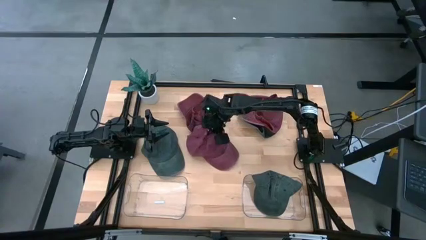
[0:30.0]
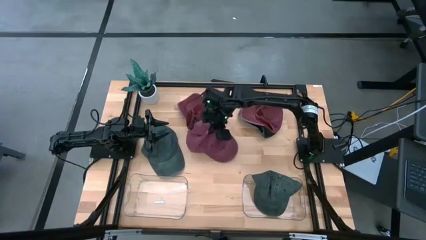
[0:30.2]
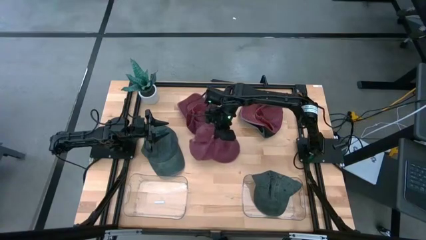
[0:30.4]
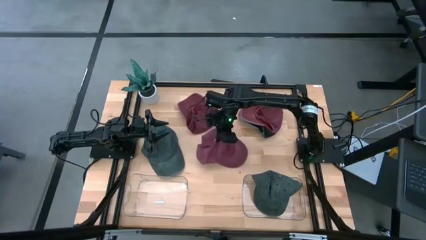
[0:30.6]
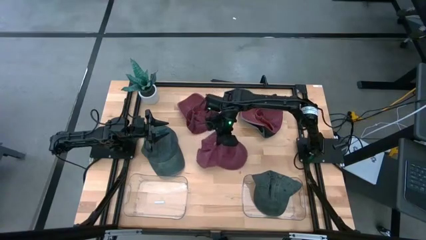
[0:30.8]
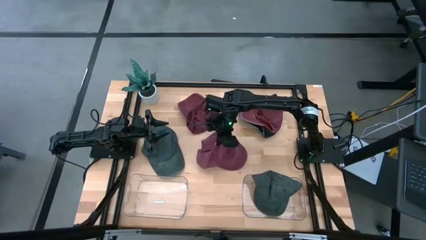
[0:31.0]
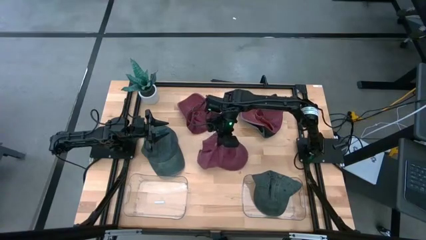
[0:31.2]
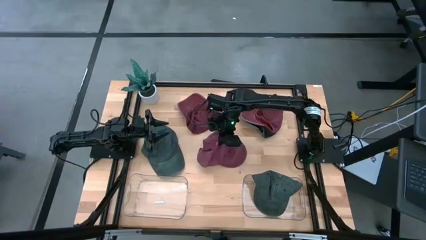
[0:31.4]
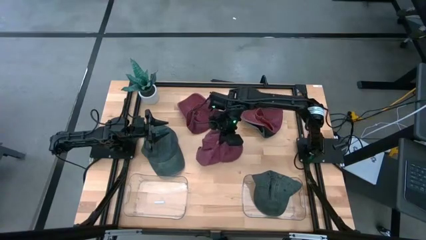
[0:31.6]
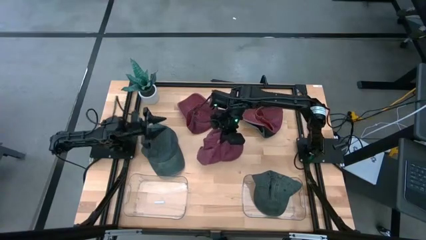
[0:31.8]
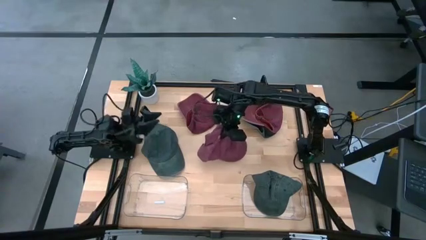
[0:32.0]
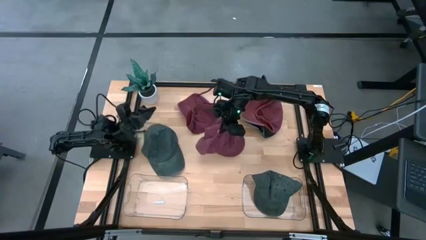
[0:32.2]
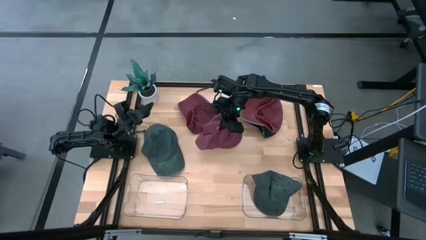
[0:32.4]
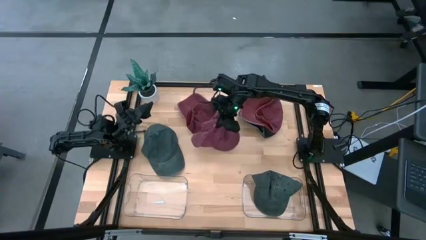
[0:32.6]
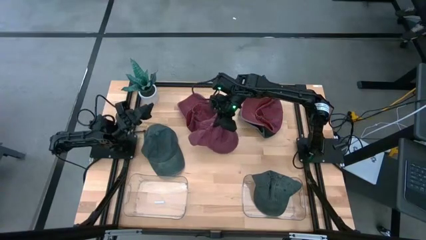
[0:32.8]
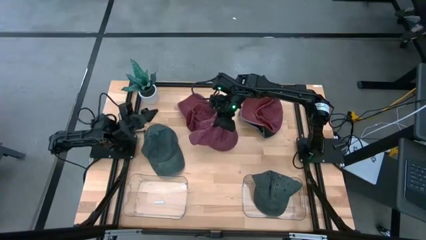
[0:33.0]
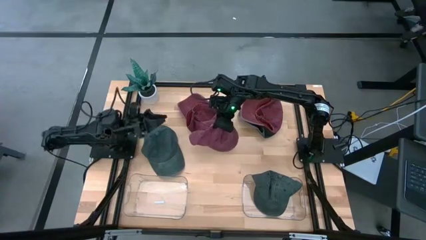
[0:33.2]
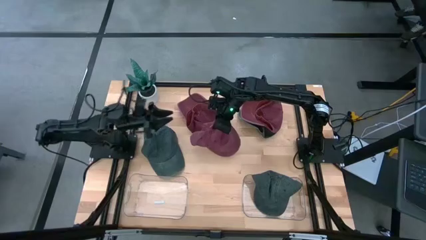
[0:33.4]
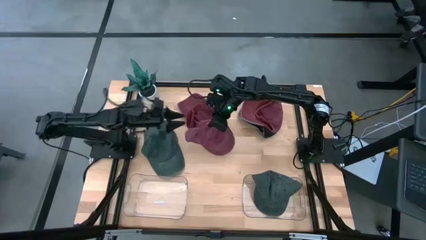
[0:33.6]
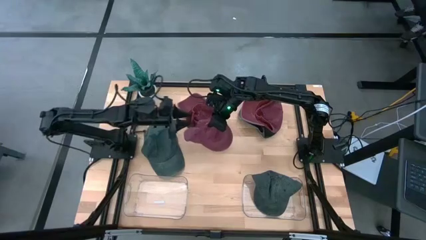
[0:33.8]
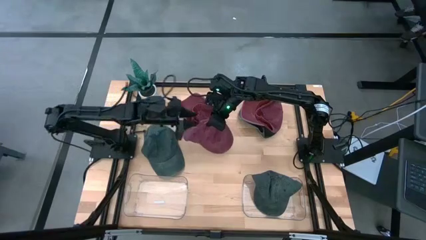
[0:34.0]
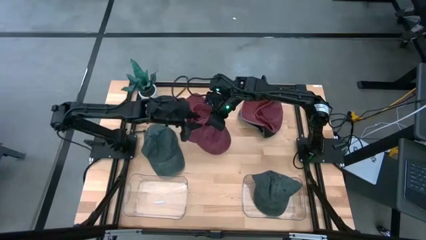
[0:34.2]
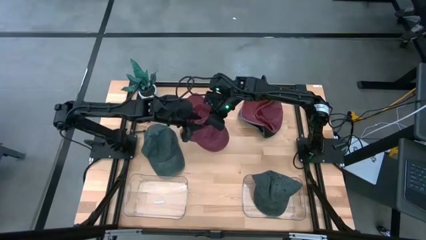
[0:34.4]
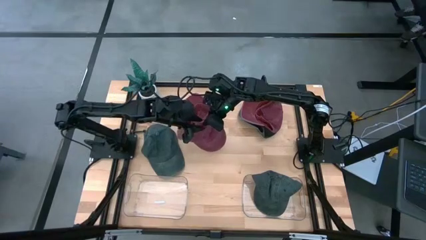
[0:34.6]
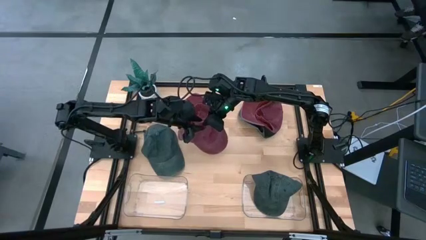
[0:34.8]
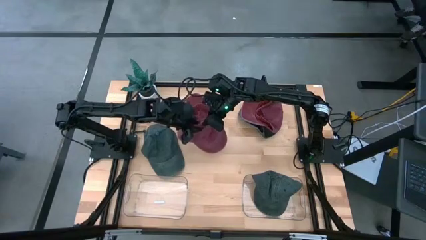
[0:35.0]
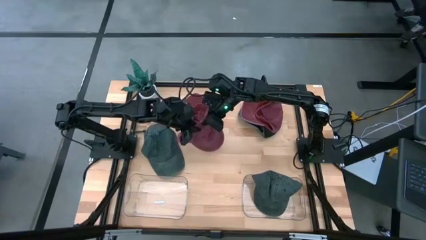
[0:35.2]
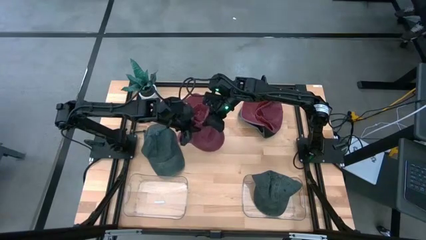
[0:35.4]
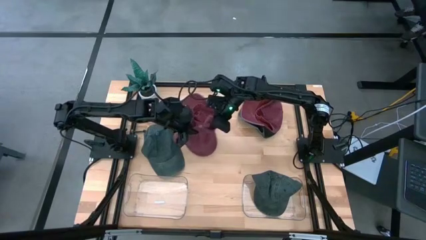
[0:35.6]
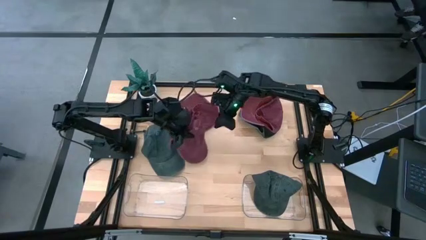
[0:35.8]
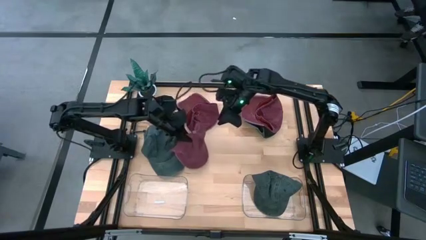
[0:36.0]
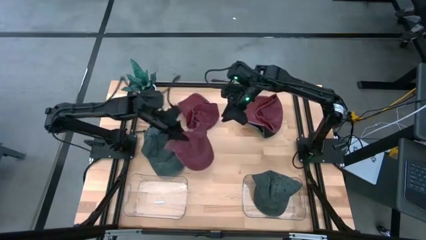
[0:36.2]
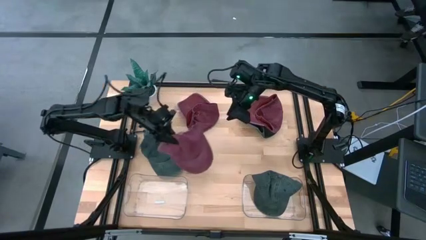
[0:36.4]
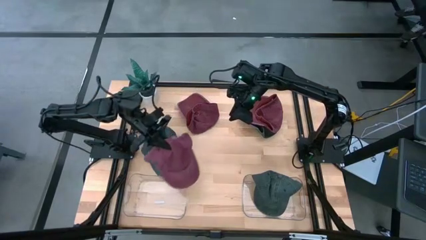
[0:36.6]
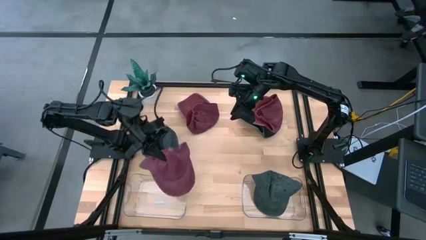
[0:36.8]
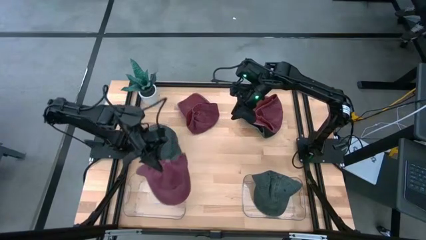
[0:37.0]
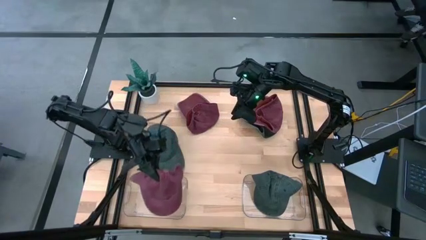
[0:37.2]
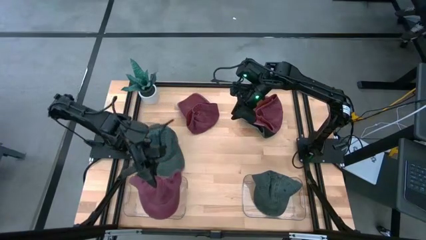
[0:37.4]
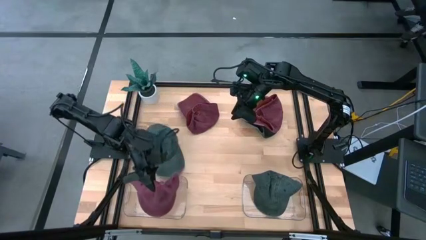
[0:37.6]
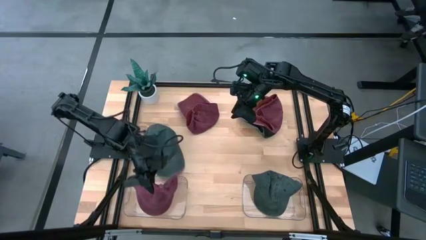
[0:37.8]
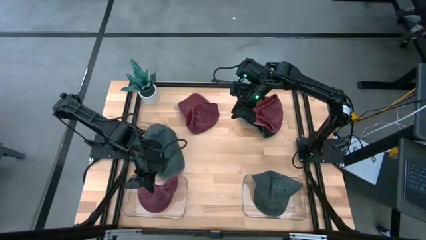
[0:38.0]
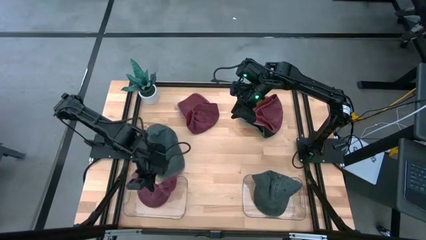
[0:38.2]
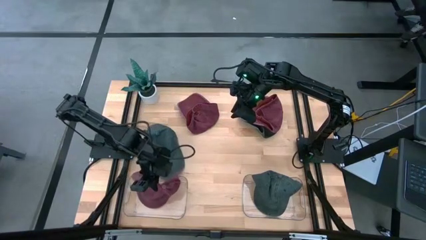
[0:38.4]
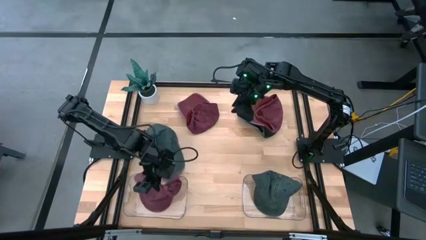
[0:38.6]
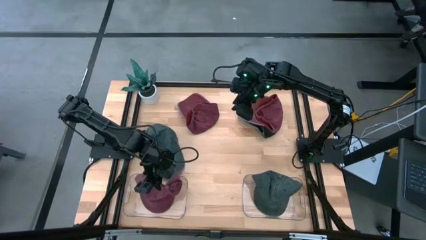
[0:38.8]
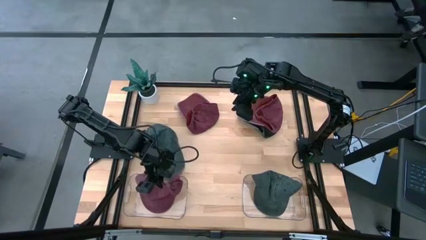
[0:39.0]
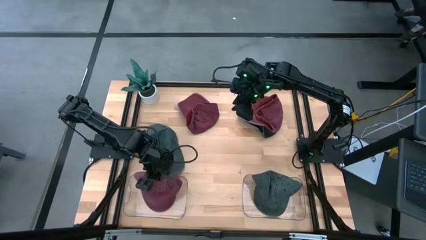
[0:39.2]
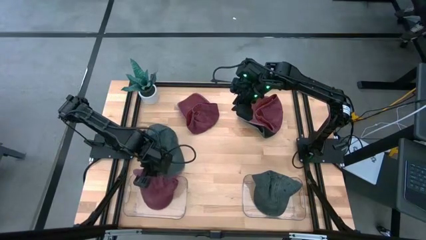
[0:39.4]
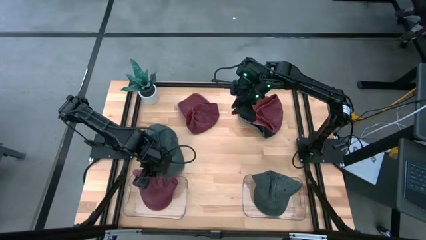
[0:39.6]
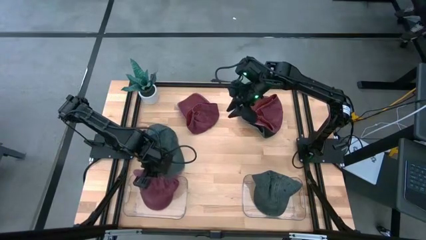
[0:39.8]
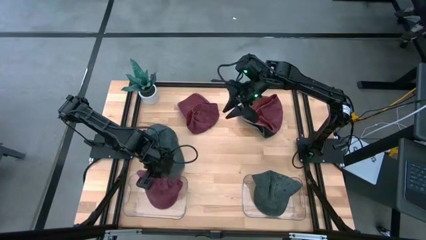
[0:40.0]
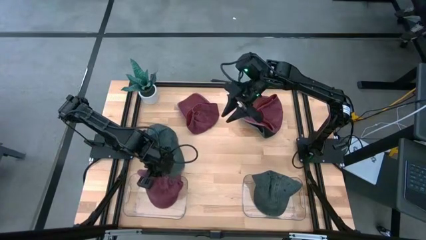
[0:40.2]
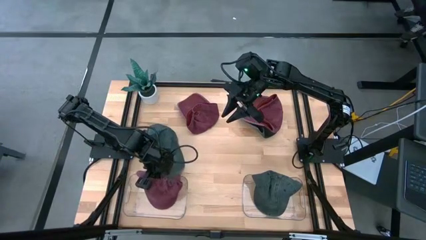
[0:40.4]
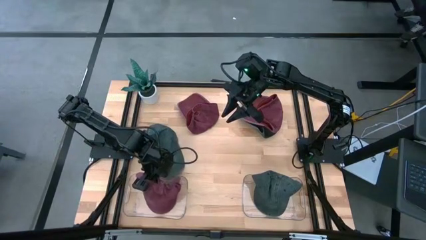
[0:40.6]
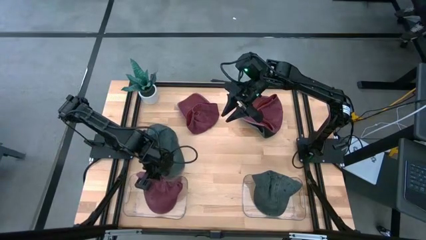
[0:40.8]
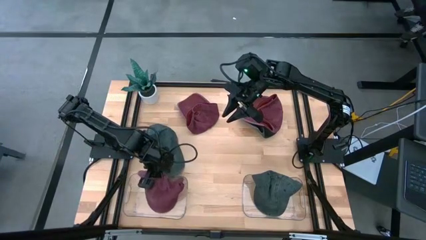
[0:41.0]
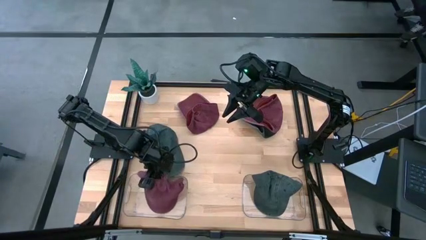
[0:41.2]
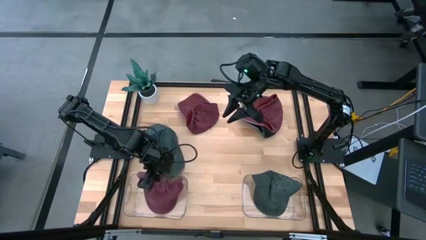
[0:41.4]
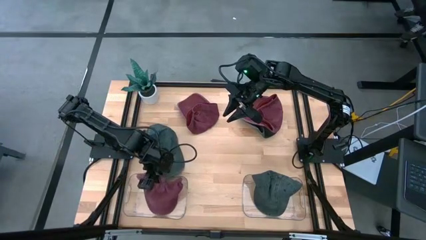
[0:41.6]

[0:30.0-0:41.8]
Task: Pick & Place hat
Put the bottom red cap into the left transparent bin

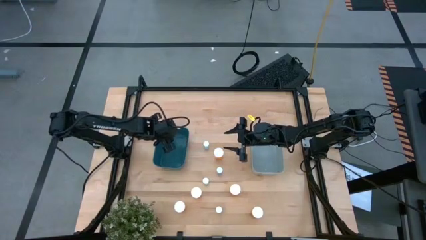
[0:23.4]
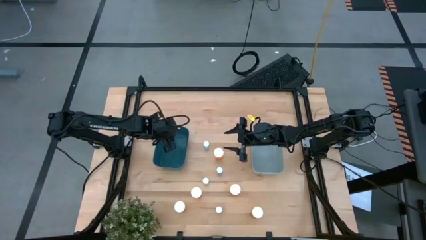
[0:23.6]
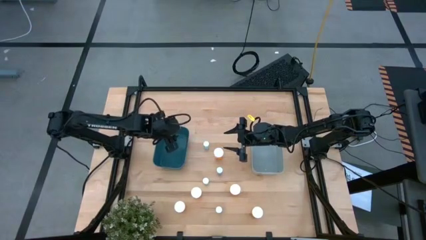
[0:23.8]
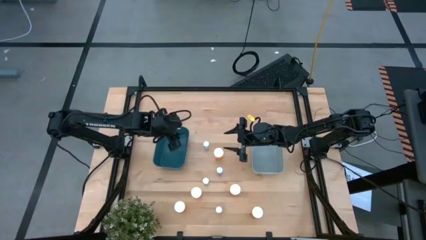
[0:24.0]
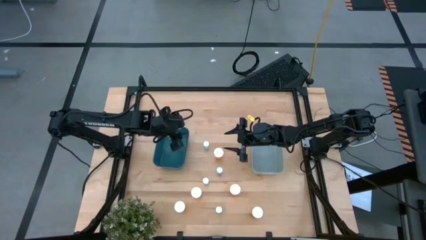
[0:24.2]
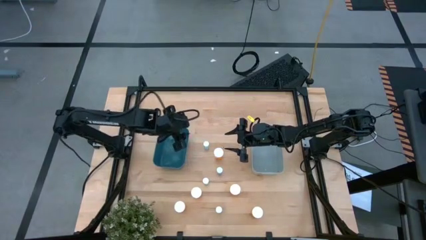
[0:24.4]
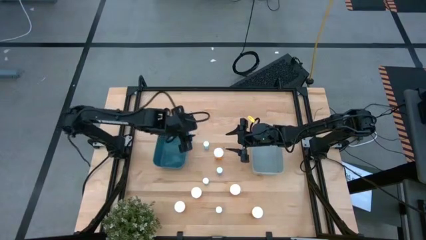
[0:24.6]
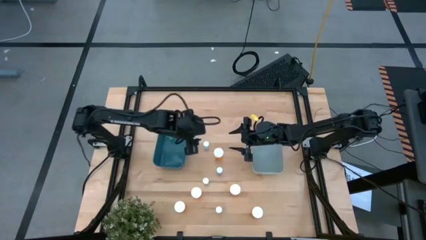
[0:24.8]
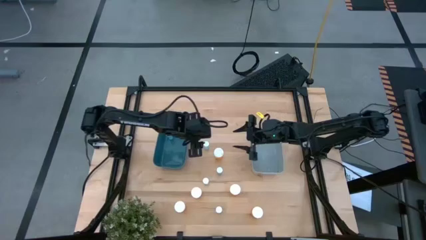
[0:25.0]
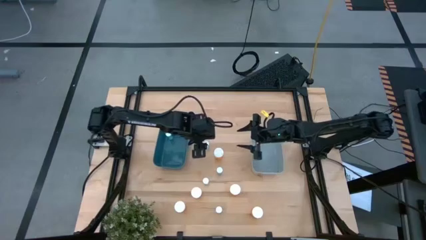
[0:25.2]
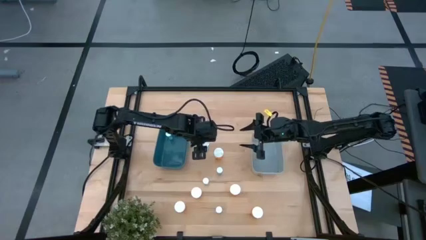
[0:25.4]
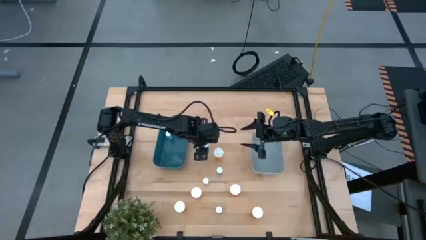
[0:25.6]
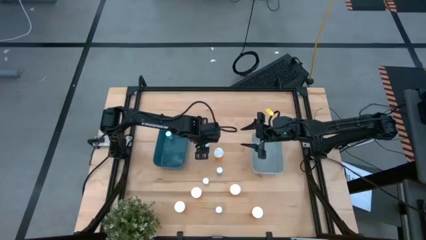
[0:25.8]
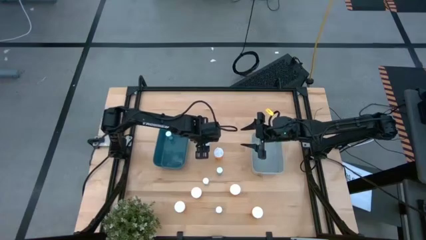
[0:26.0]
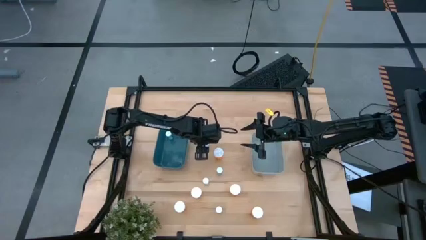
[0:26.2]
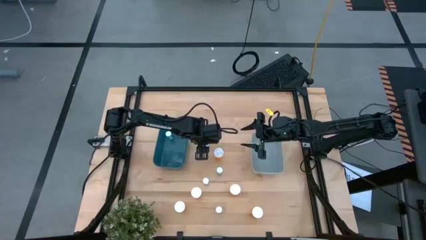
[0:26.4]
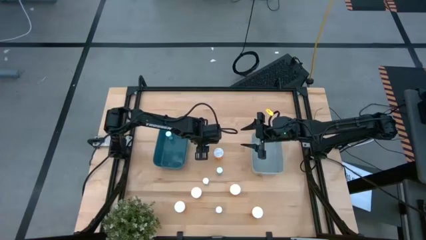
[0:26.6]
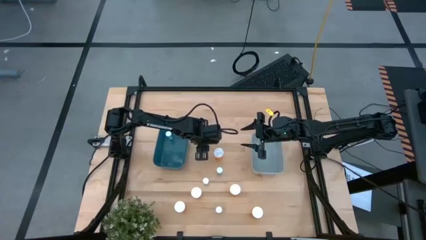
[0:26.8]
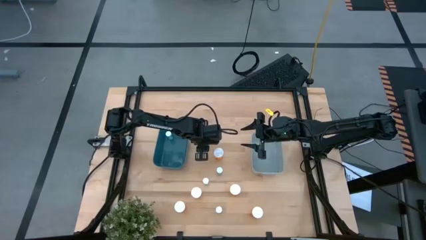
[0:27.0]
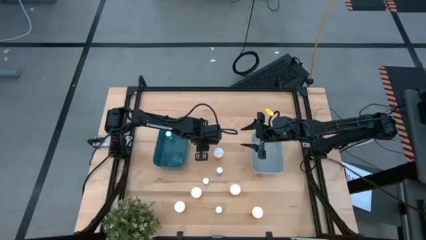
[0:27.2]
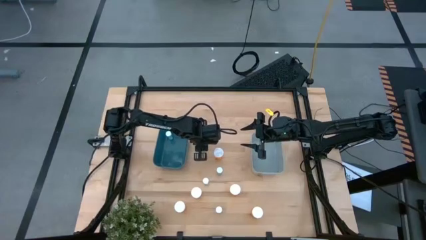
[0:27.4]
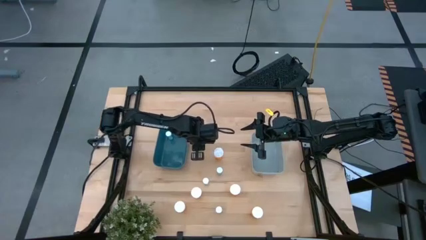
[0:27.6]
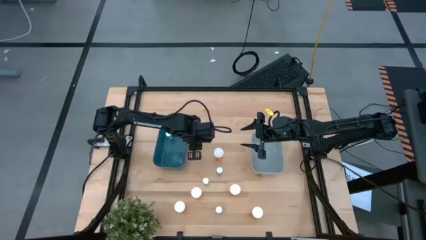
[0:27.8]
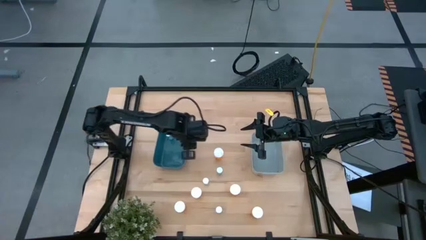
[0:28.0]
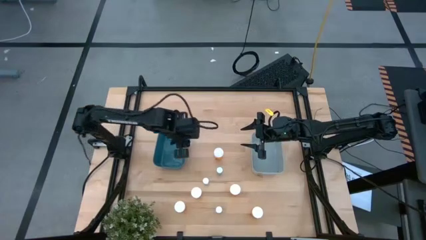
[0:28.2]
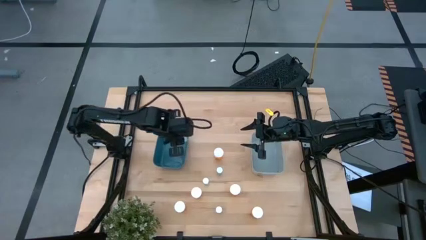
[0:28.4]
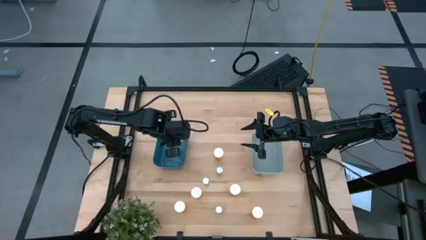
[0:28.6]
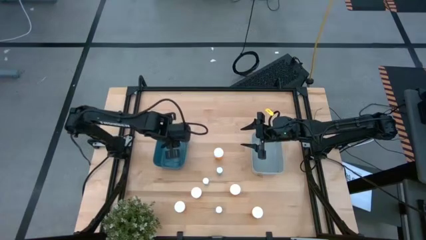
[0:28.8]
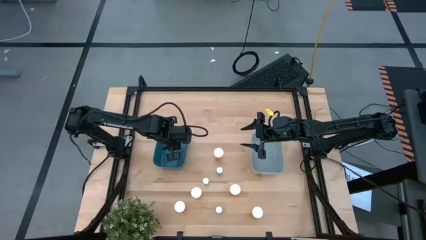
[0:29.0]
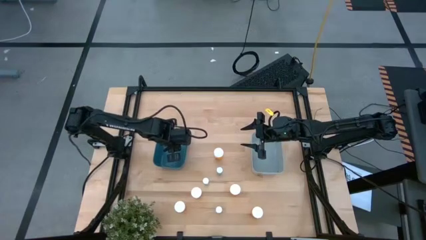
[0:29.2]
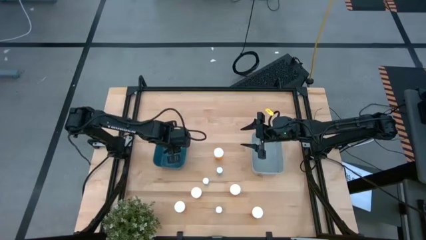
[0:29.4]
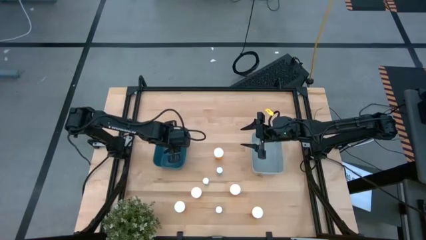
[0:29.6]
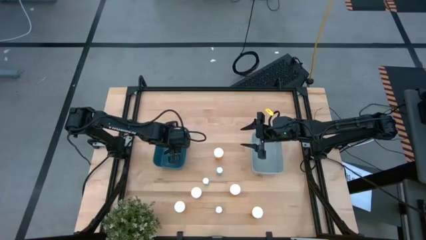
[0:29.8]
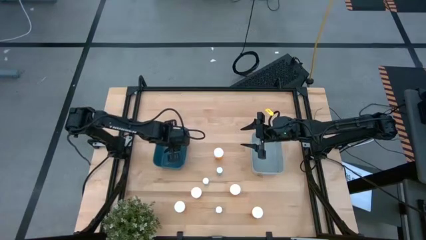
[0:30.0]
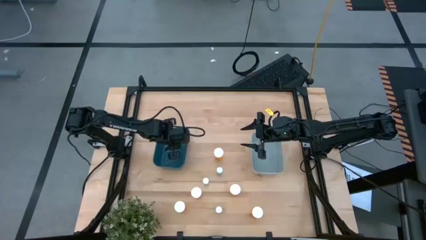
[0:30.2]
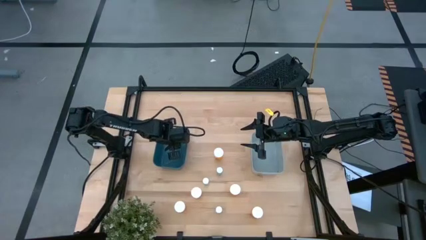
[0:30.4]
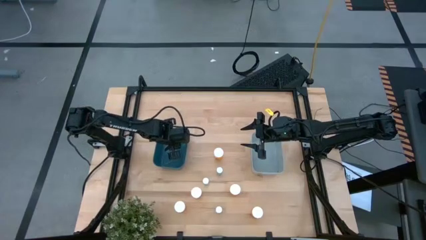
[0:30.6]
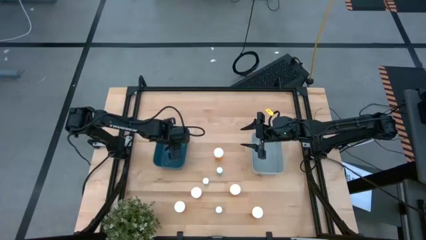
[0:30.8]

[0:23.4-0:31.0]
Task: Pick and place medicine bottles into bin by pill shape (circle, oval)
Put the blue pill bottle into the blue bin
